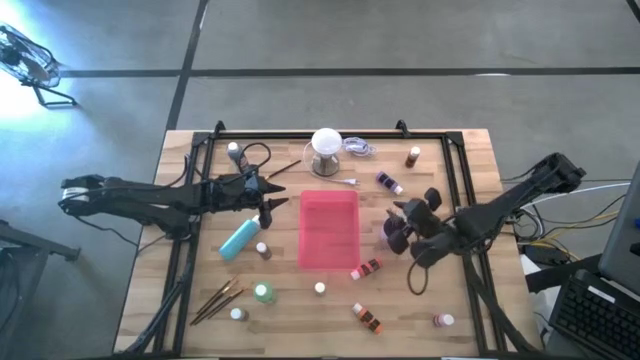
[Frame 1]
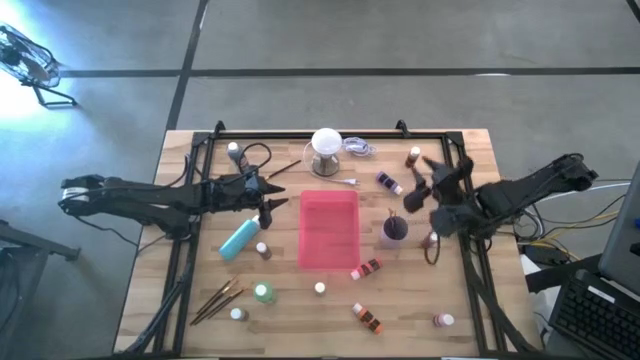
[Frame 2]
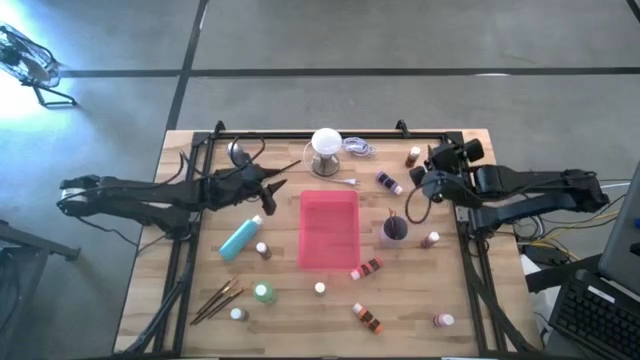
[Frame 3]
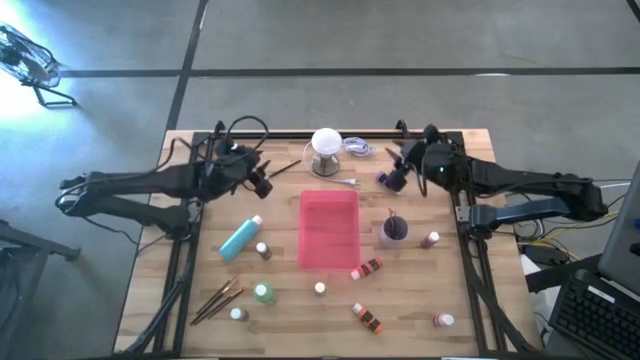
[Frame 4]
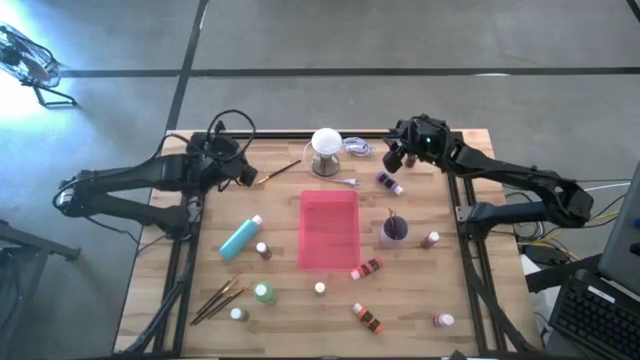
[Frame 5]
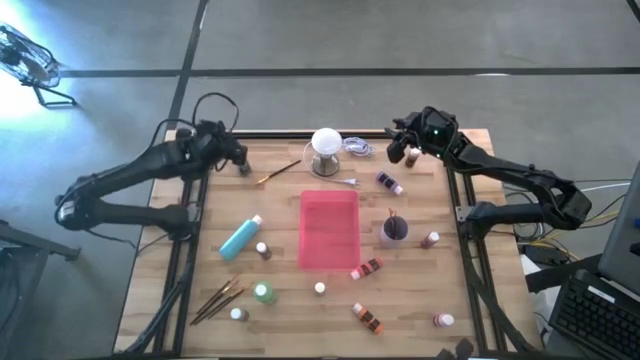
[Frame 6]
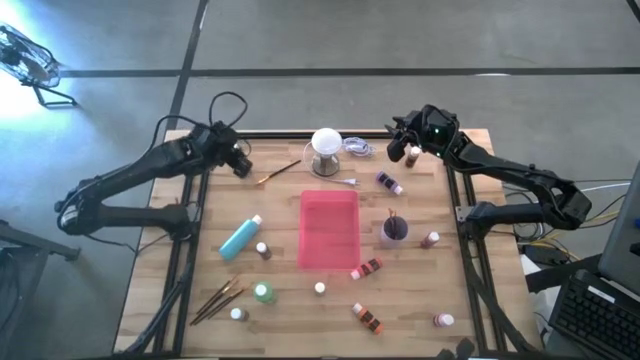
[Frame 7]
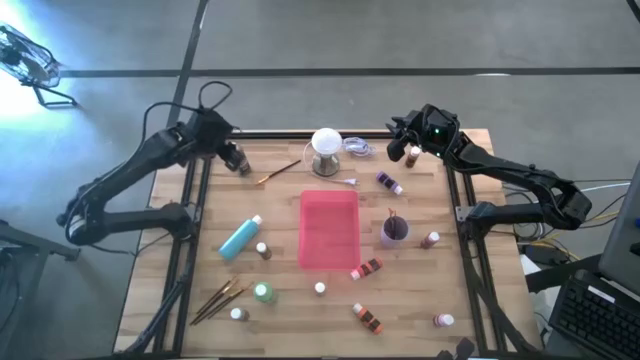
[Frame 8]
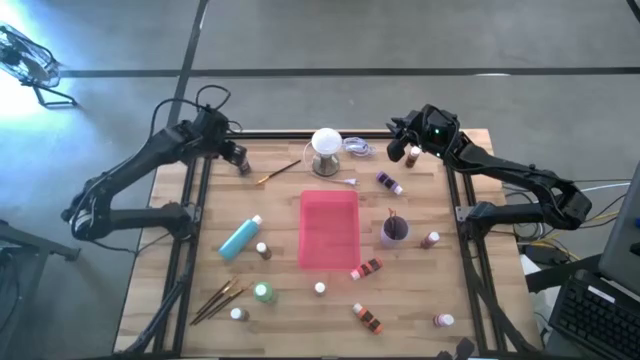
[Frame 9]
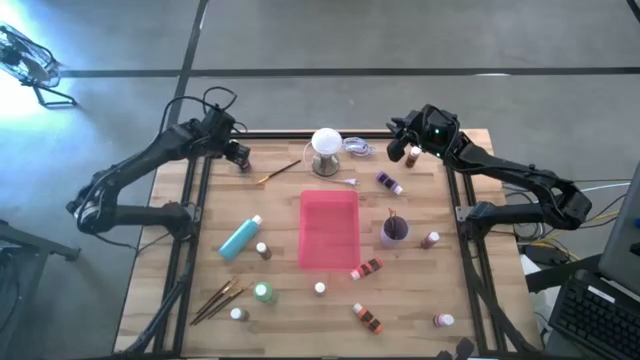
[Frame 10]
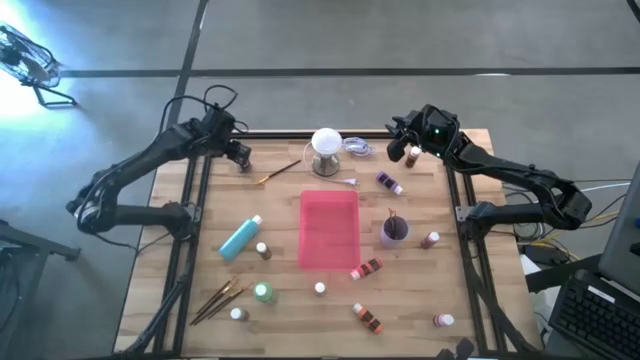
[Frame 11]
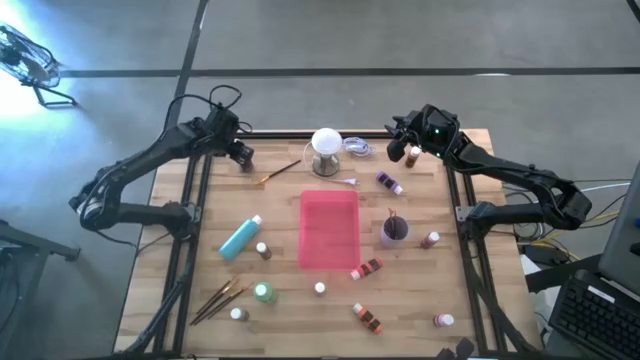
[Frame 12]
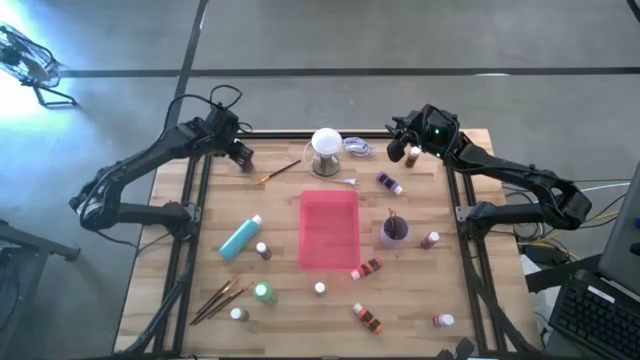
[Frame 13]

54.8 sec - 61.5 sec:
Task: Pick & Place Paint Supplies
Put the large blue paint bottle into the red bin

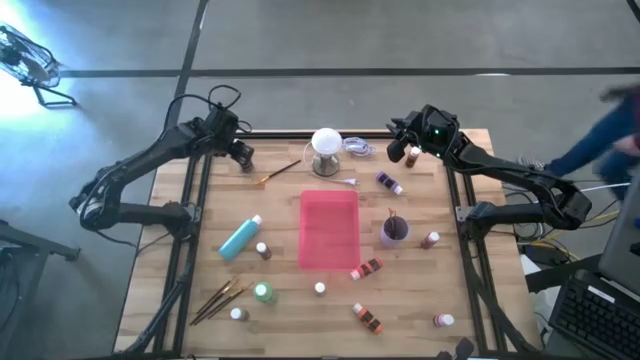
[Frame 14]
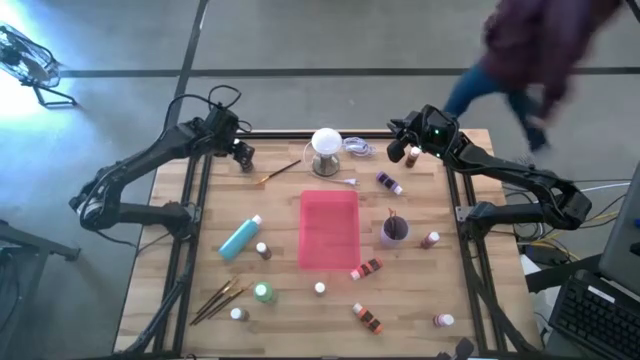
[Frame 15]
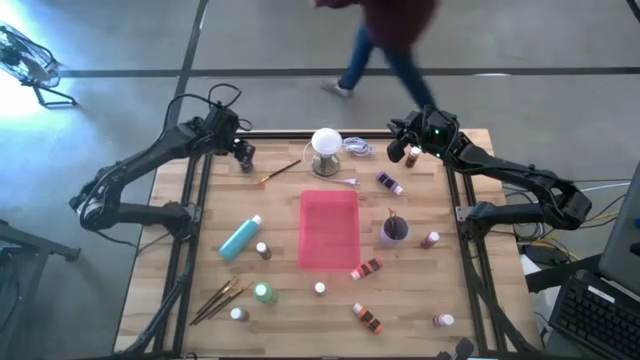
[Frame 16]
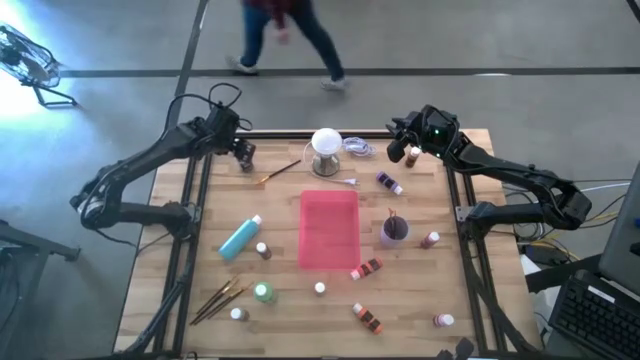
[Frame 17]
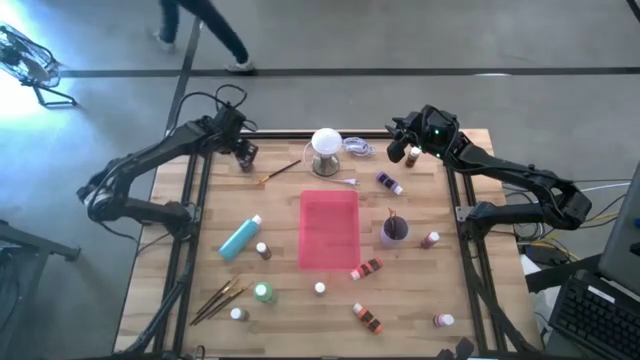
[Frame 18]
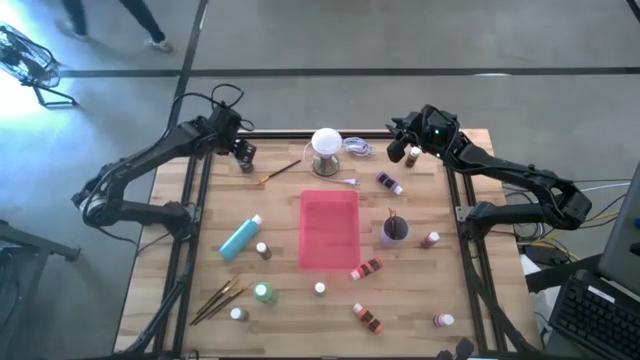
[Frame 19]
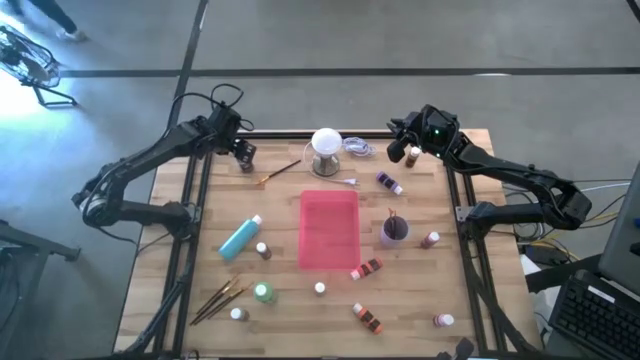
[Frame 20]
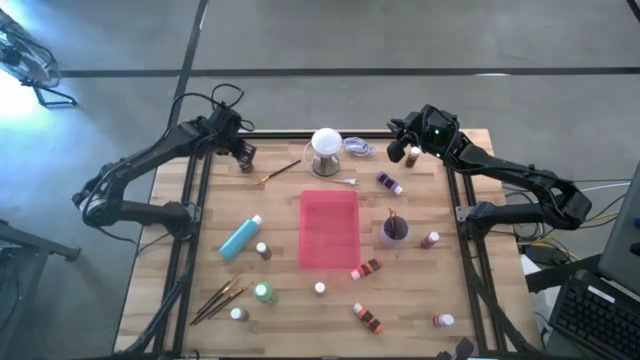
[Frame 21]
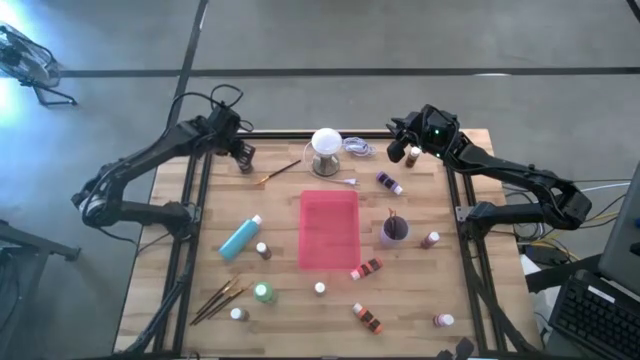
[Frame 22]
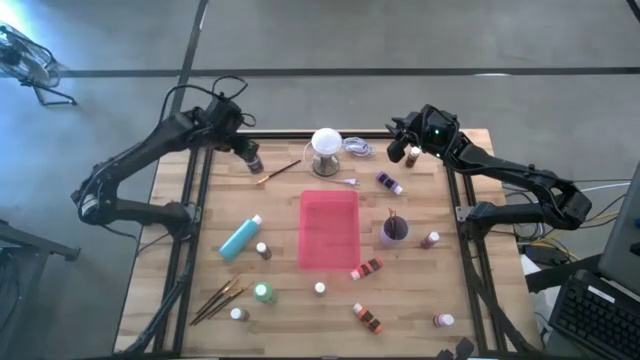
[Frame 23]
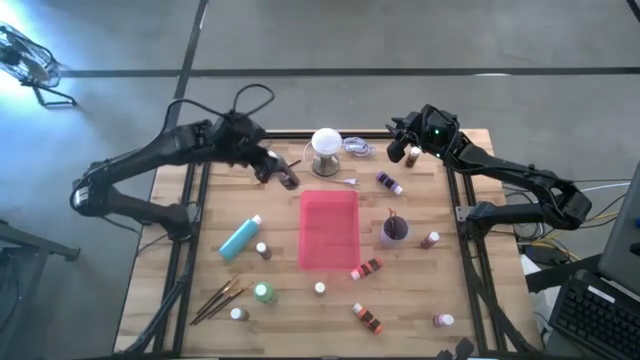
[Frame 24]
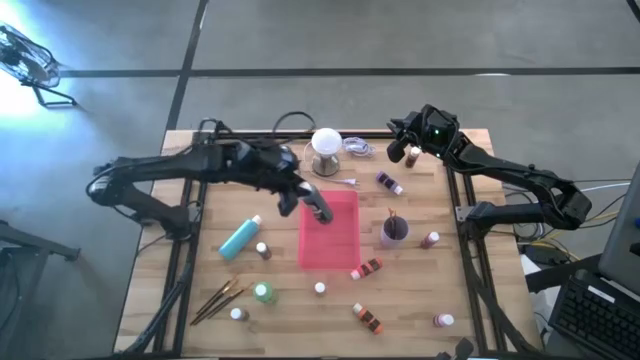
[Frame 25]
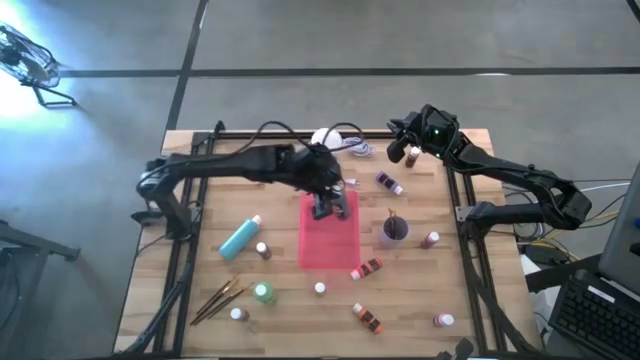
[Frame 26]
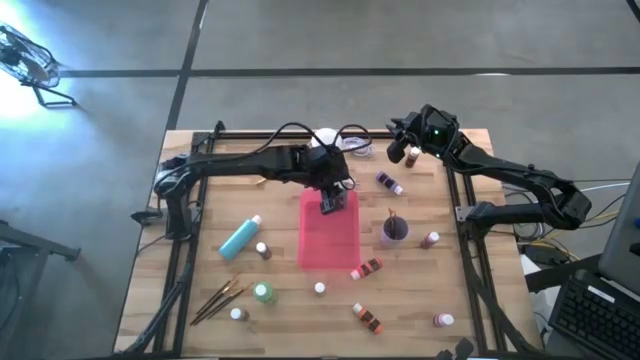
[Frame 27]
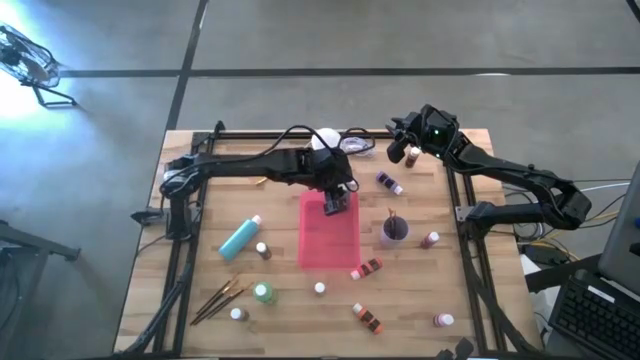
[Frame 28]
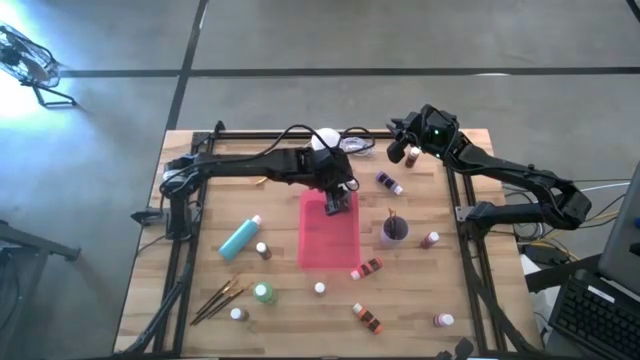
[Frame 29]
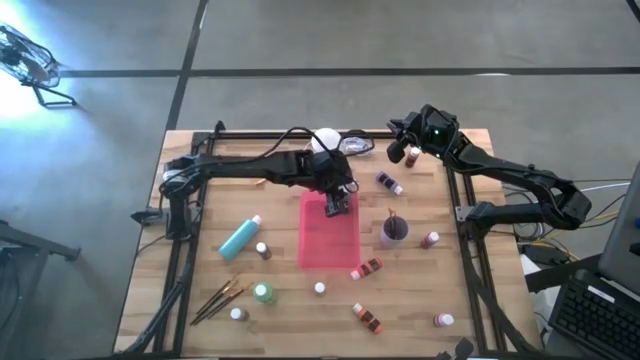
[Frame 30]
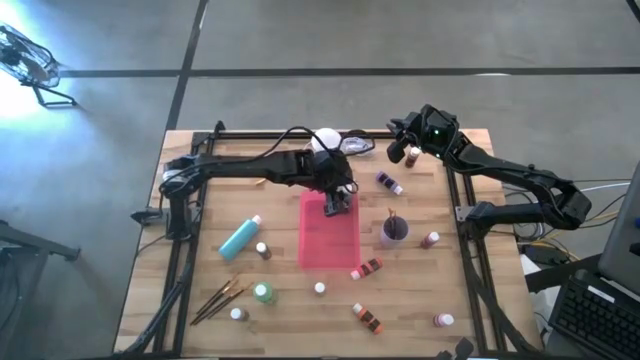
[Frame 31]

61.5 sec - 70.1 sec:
Put the large blue paint bottle into the red bin
